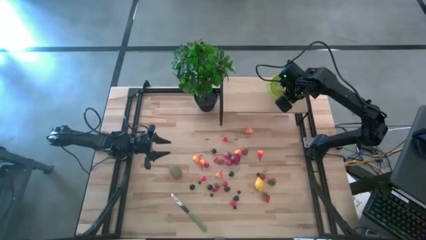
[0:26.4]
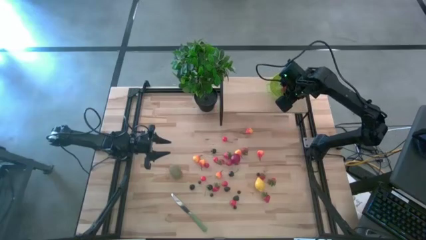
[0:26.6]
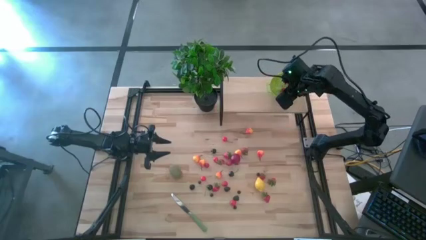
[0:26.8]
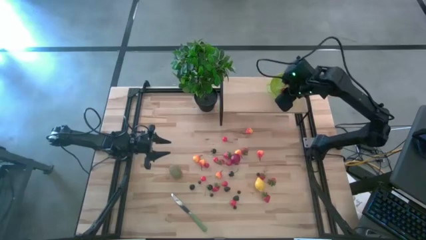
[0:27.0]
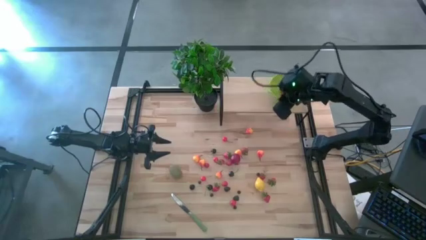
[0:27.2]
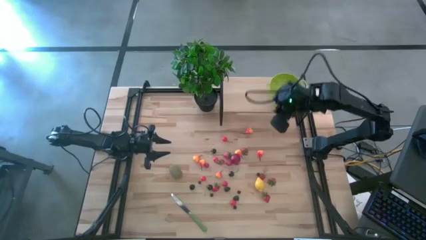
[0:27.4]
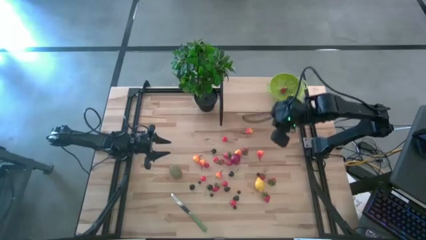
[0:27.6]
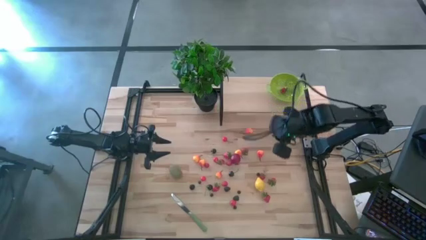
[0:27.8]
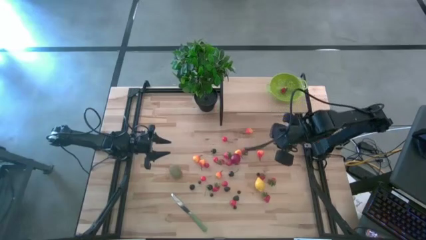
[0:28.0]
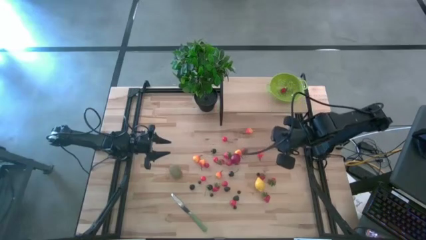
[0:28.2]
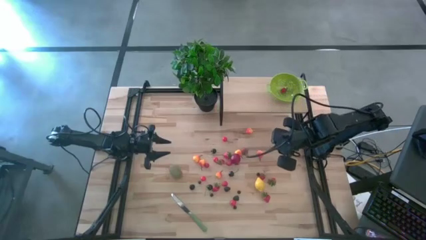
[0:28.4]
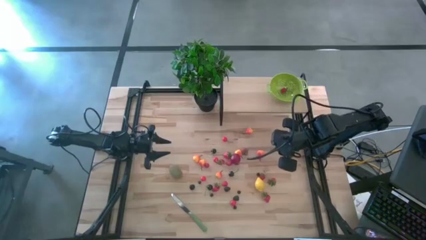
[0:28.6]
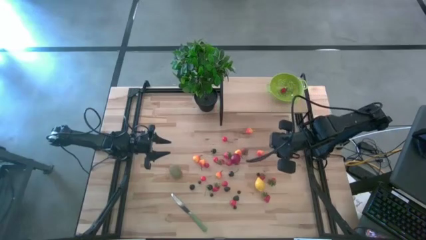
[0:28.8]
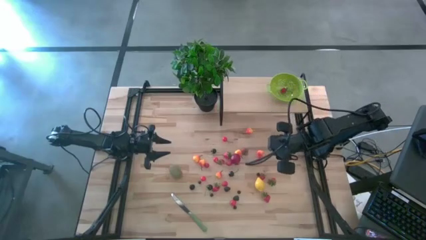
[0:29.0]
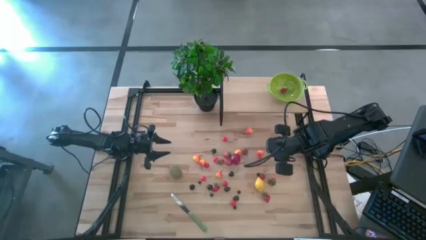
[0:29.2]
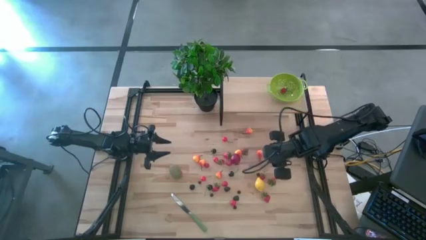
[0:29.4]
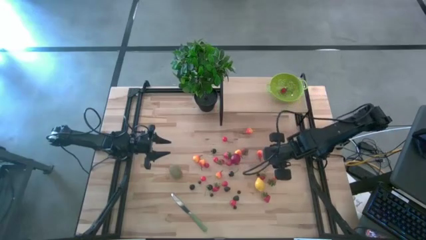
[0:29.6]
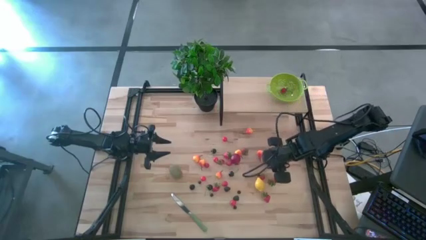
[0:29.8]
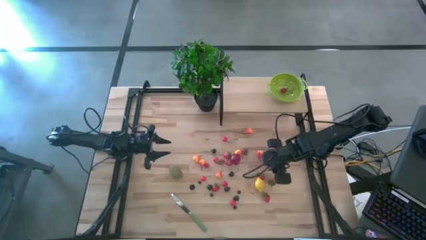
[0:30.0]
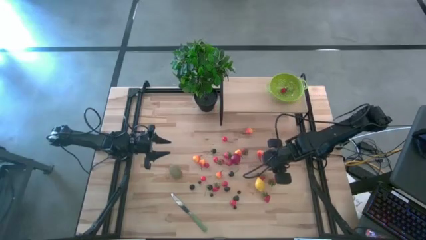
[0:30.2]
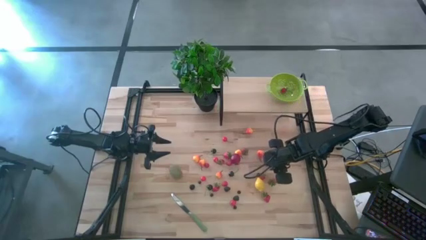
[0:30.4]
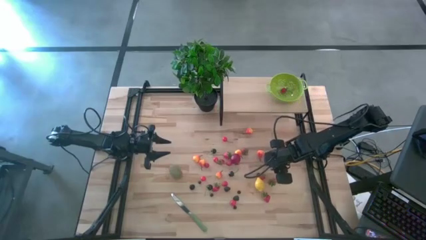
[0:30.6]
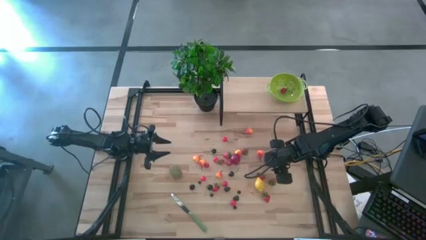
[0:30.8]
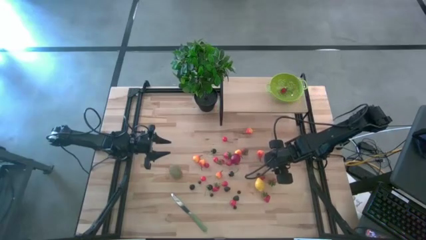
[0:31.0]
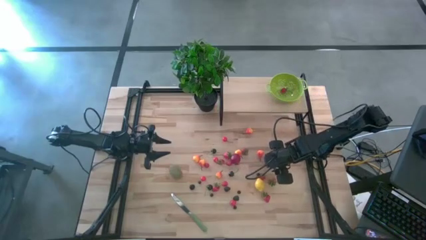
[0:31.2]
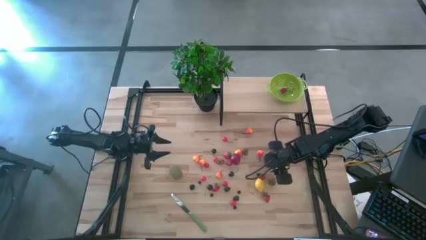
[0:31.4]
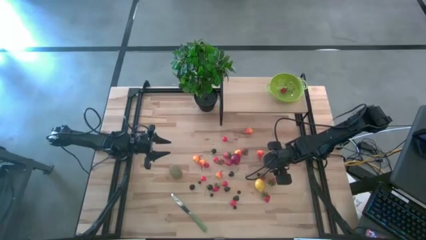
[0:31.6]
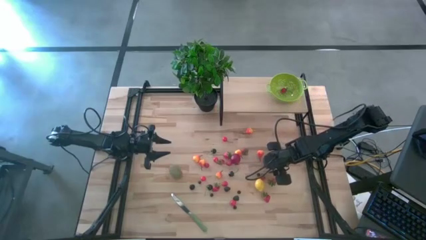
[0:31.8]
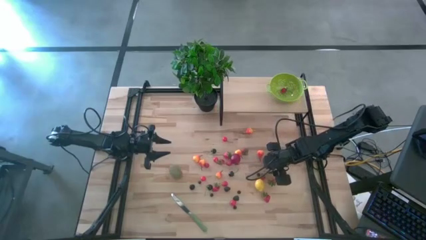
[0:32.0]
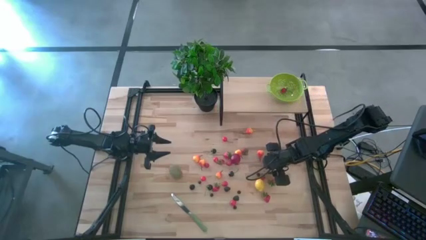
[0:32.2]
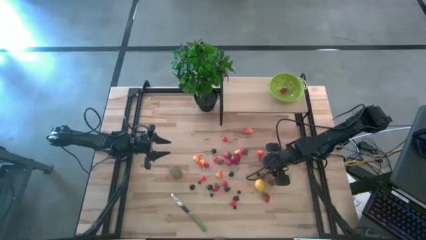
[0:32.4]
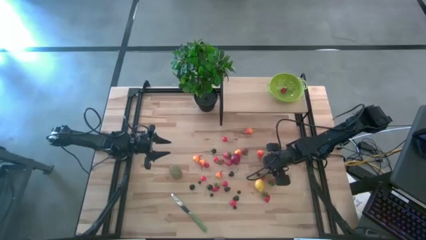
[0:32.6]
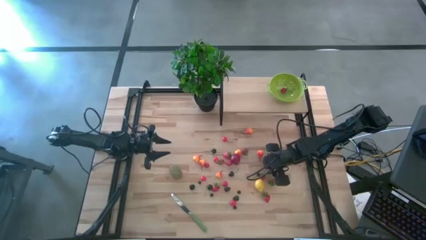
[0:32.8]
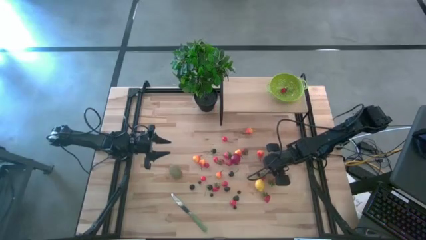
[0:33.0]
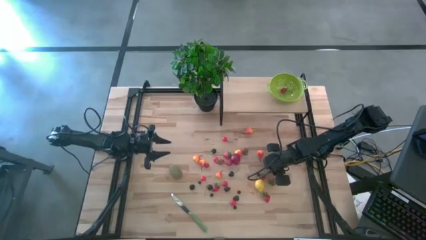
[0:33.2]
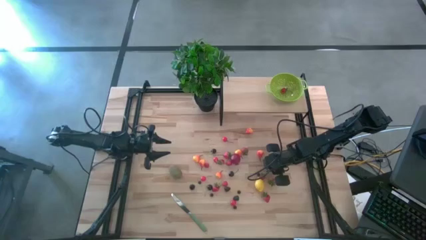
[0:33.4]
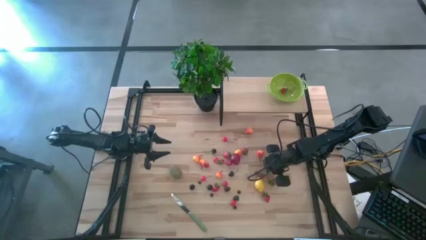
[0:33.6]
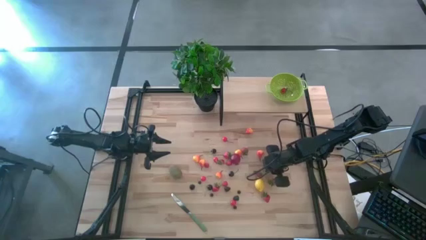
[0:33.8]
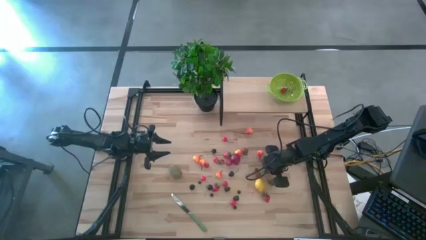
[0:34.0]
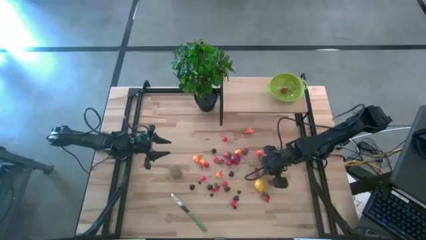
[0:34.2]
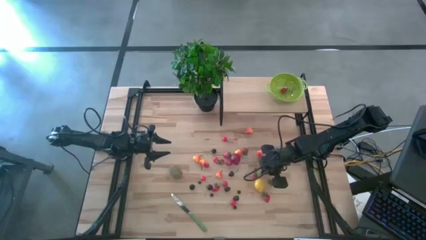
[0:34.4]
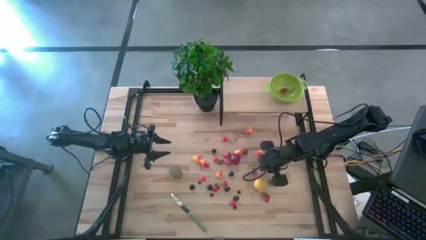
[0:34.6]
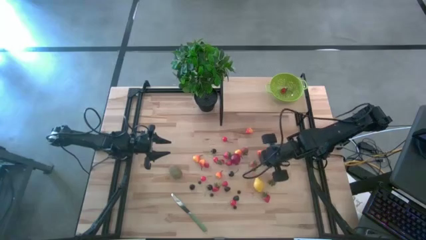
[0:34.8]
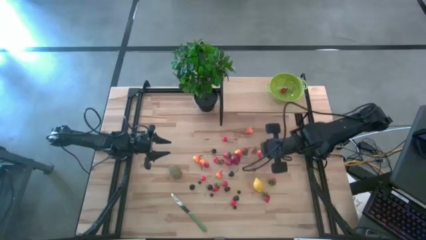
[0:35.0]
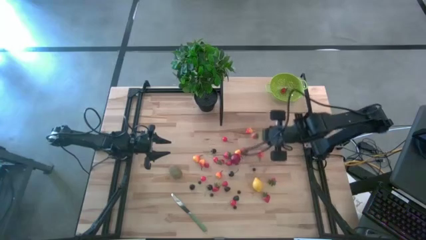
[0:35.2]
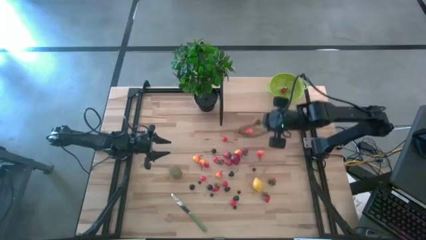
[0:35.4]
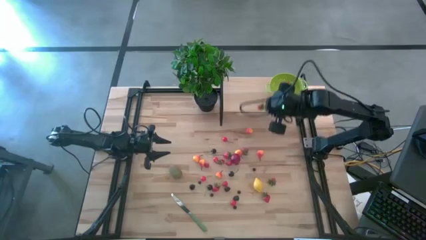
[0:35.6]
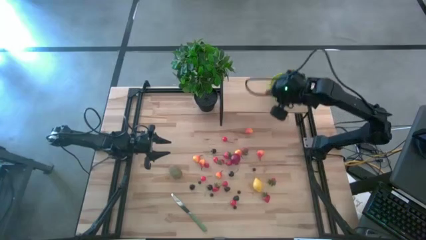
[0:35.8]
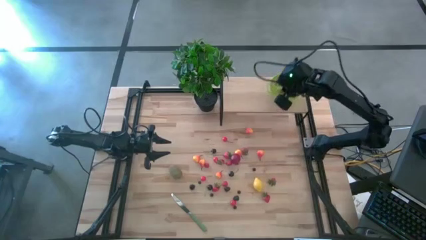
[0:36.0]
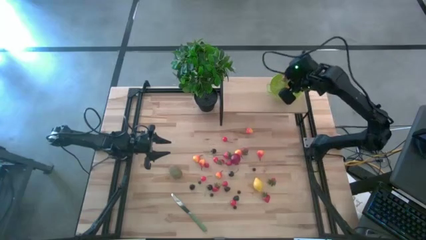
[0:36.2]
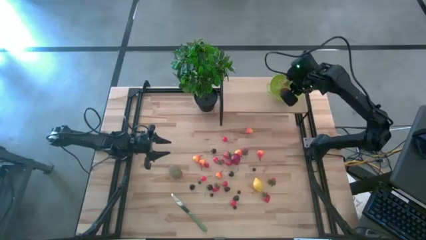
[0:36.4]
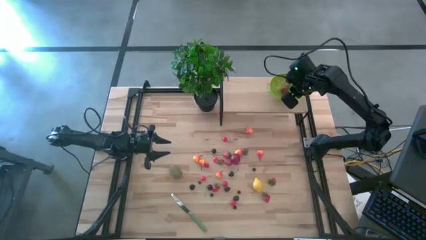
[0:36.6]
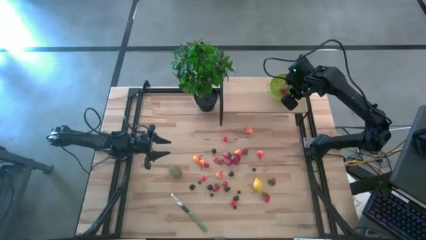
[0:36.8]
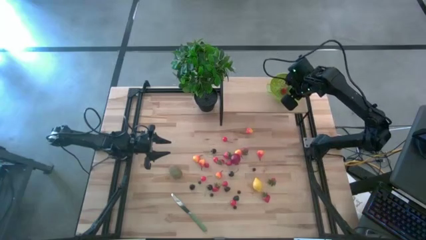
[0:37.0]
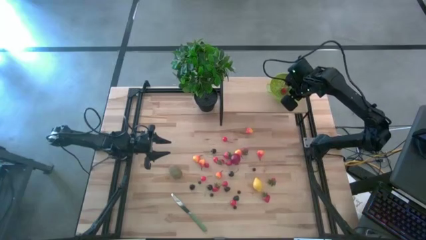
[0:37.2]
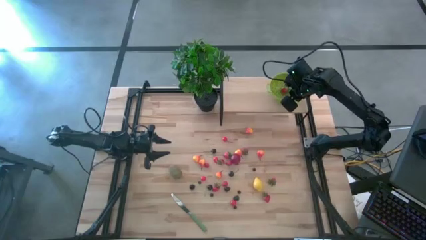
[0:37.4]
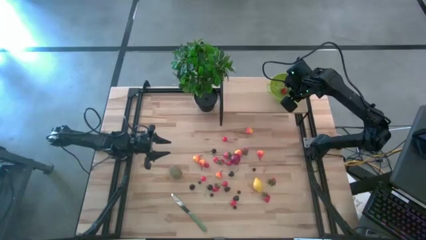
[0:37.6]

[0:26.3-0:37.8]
Task: Pick & Place Fruit
Put the strawberry into the green strainer bowl on the shelf

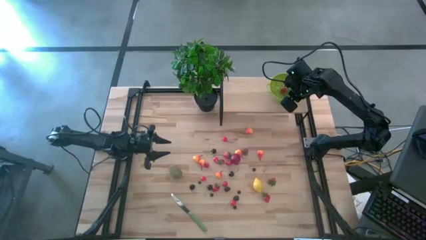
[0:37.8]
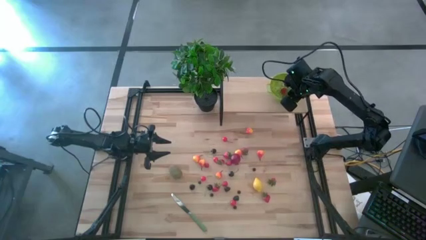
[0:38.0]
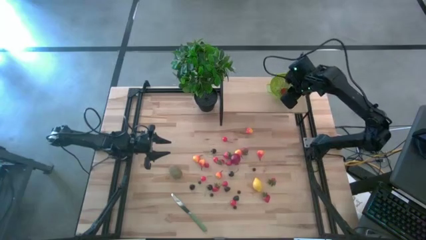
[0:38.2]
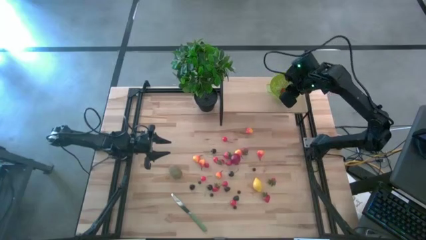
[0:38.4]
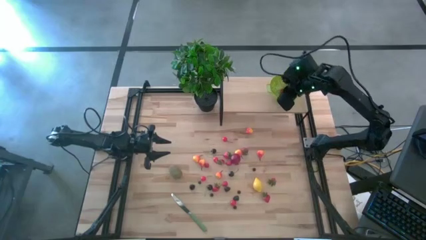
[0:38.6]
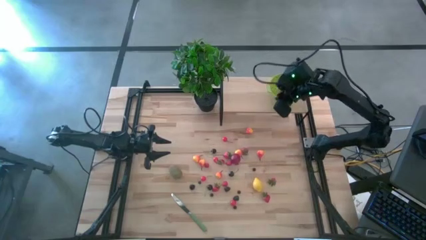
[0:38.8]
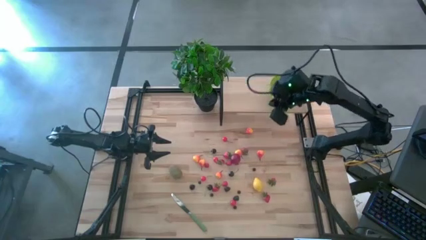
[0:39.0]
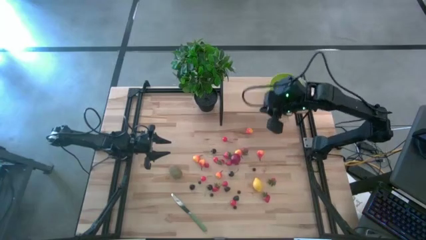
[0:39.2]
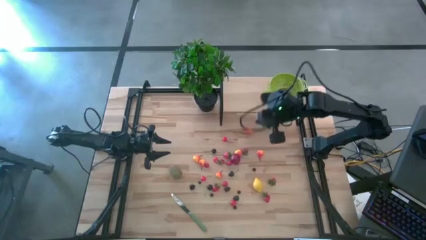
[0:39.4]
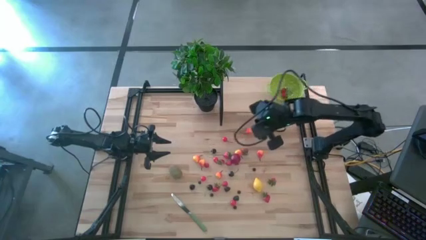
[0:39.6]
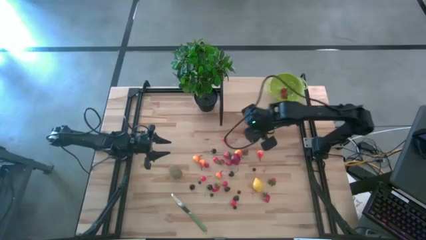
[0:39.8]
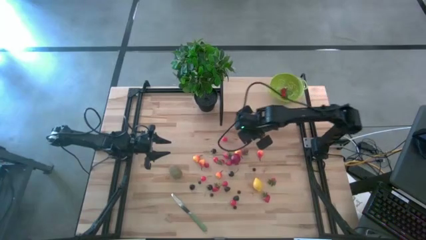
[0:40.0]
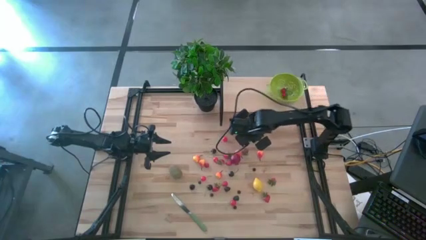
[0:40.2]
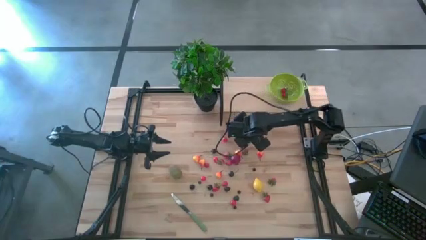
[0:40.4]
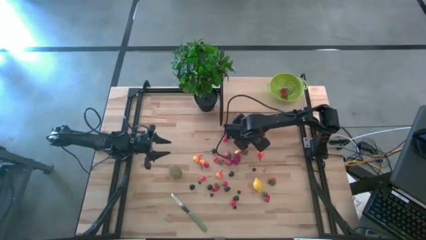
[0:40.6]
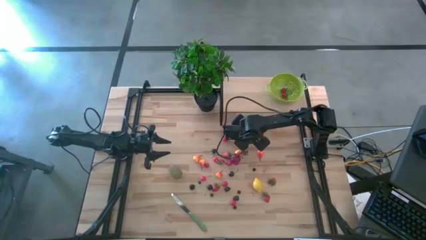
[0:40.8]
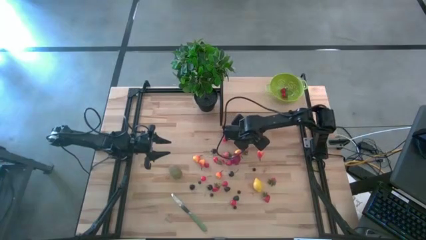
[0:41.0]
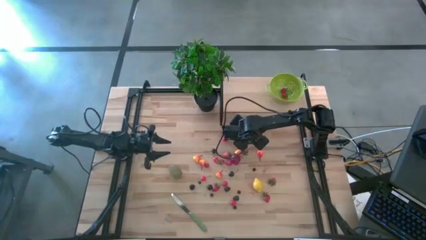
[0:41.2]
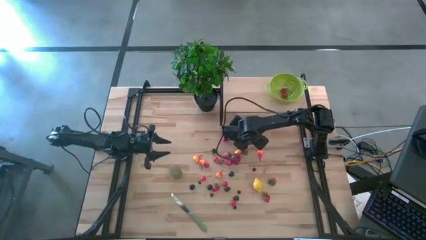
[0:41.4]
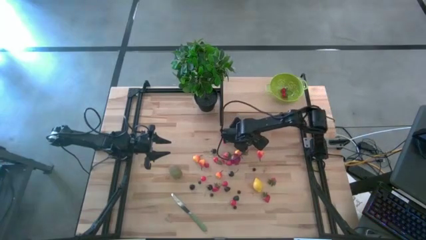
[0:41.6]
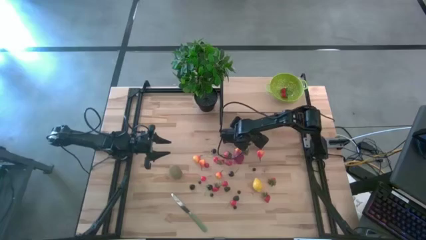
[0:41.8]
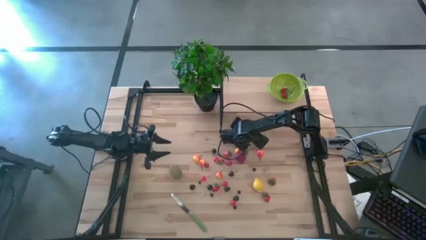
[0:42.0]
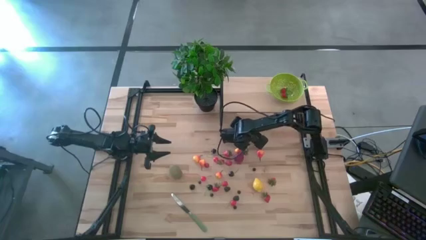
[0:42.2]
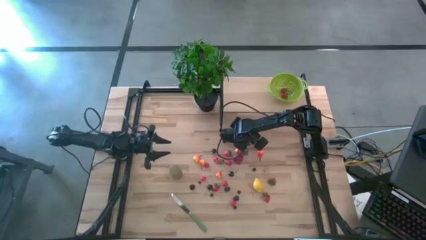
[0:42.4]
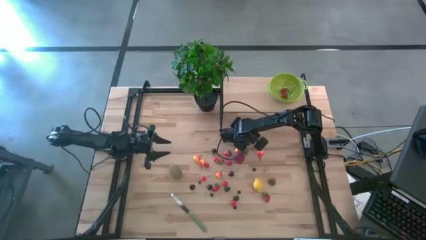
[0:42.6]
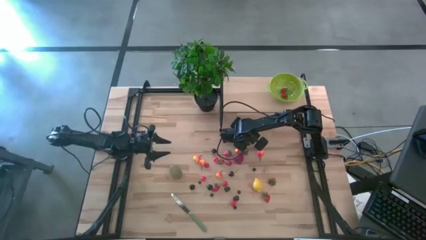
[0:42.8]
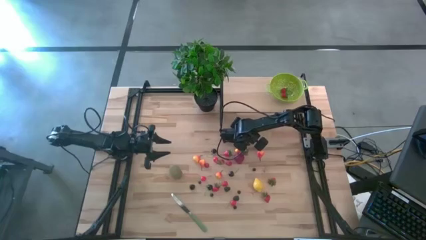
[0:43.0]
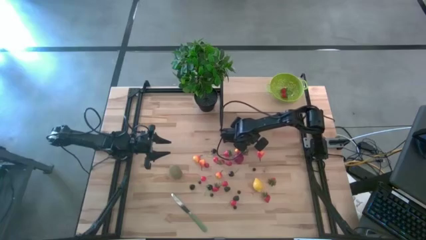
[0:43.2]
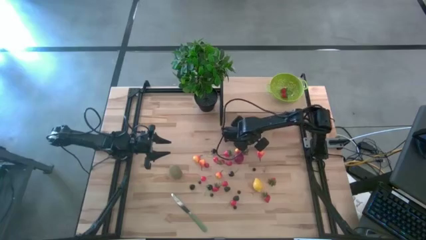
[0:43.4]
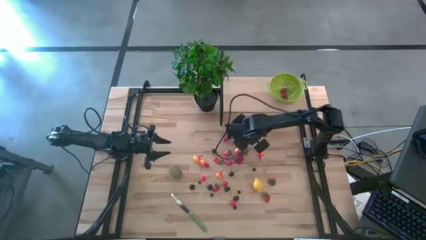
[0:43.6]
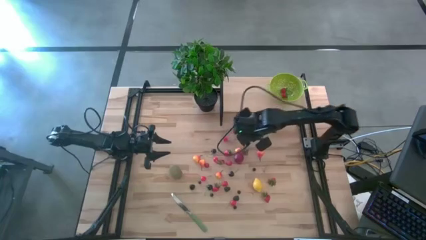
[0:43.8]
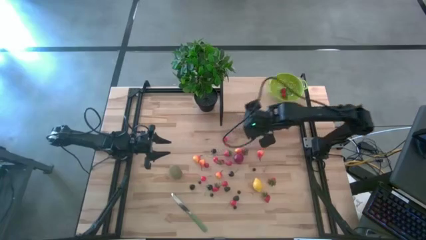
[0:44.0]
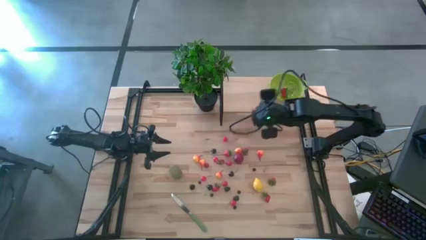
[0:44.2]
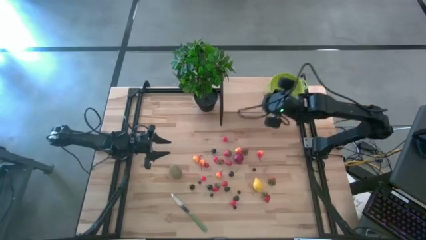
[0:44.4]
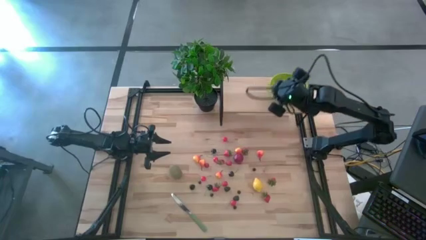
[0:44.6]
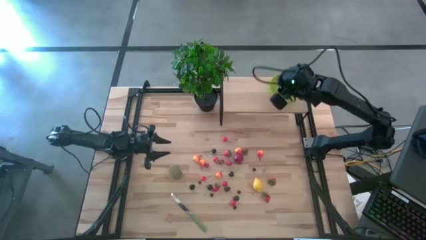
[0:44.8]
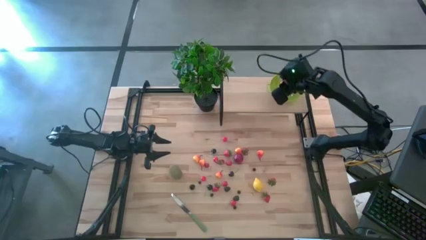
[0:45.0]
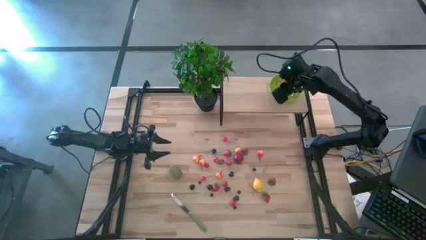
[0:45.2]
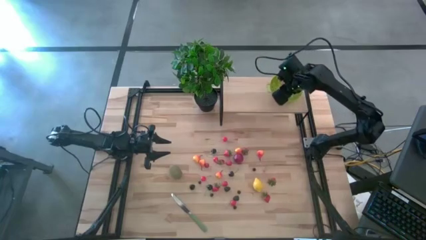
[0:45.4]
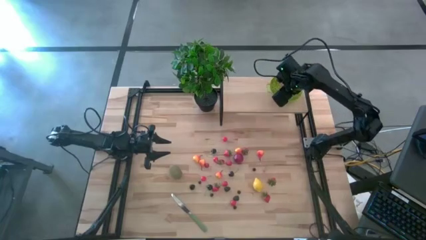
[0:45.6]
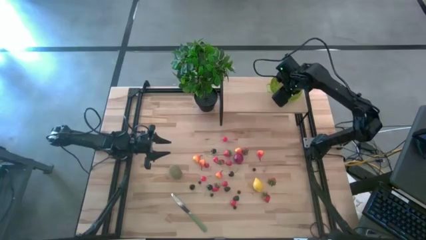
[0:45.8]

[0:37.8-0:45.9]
Put the pear into the green strainer bowl on the shelf
